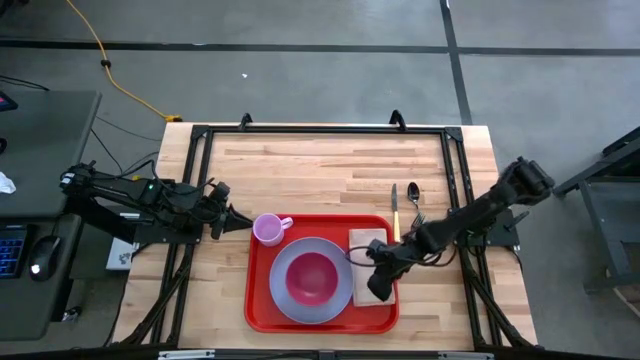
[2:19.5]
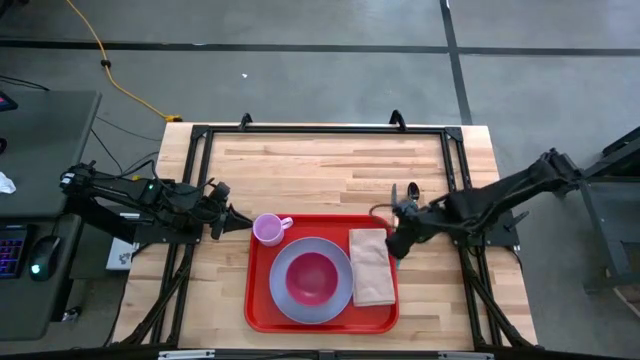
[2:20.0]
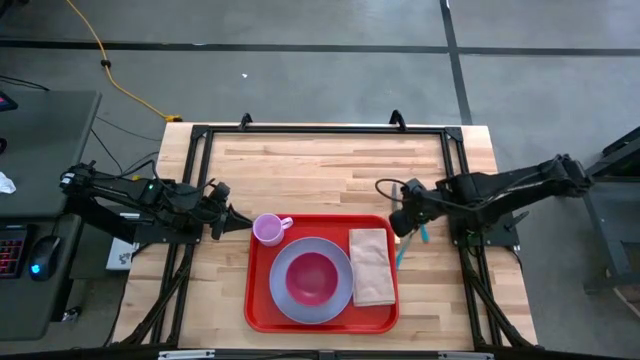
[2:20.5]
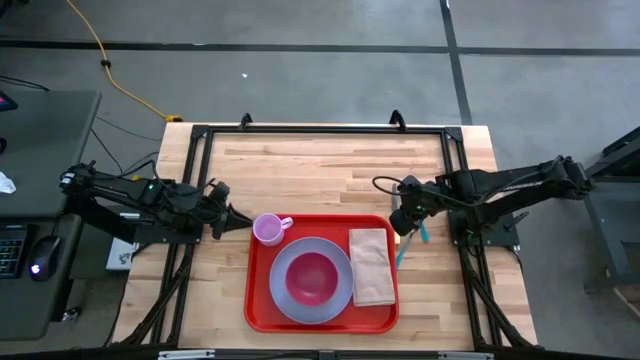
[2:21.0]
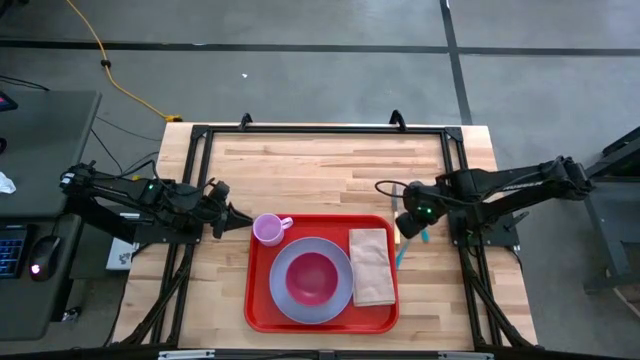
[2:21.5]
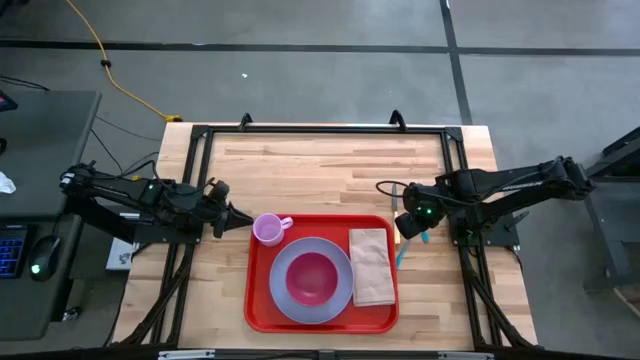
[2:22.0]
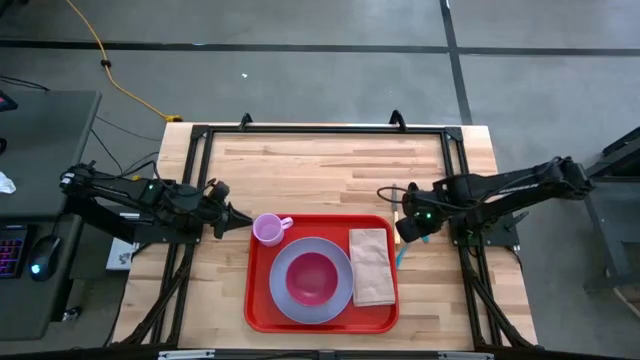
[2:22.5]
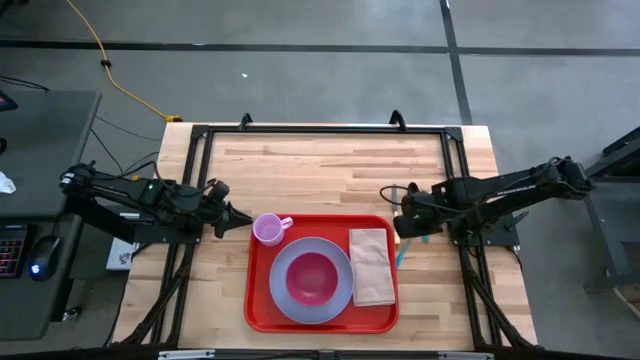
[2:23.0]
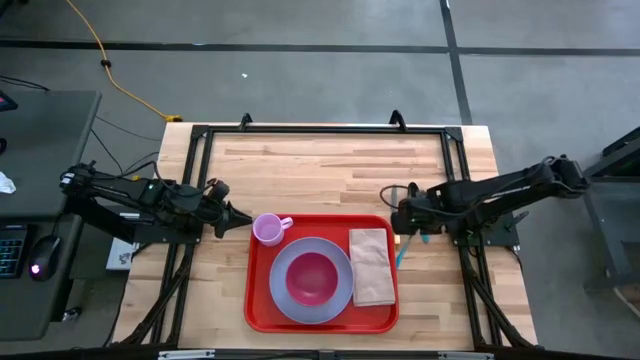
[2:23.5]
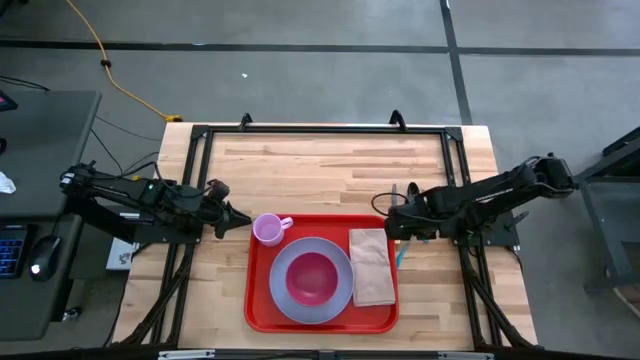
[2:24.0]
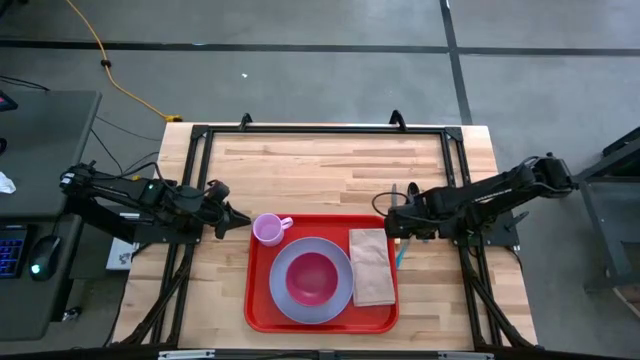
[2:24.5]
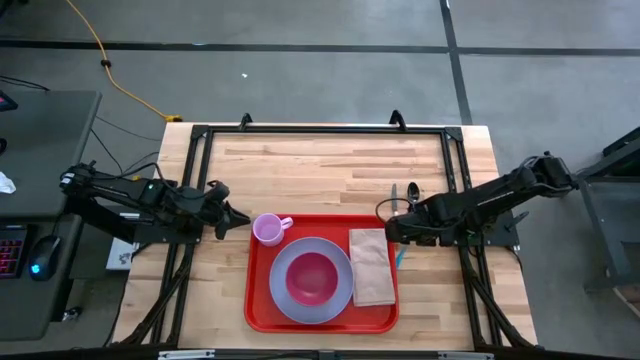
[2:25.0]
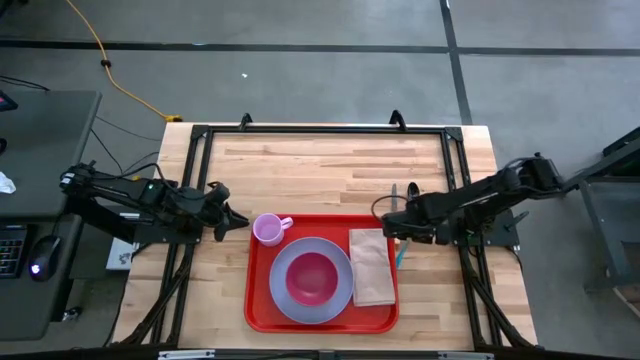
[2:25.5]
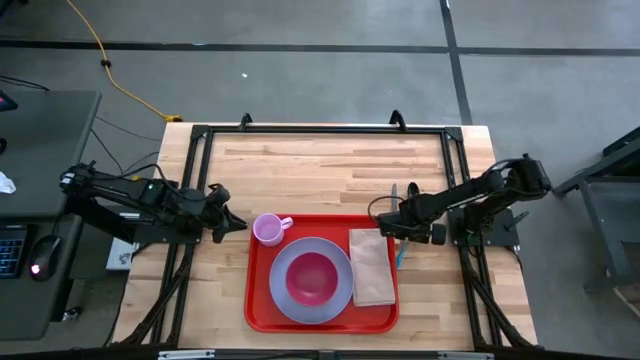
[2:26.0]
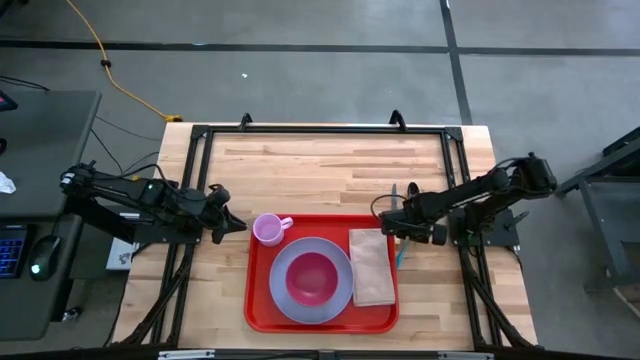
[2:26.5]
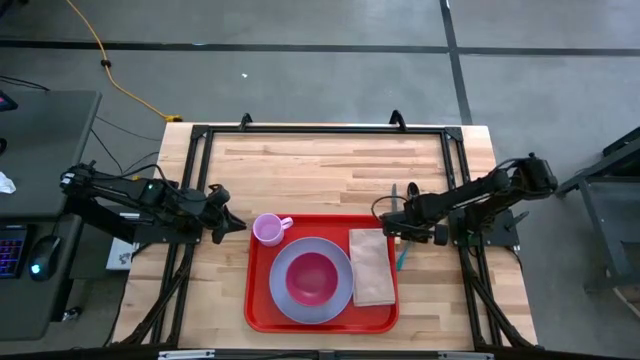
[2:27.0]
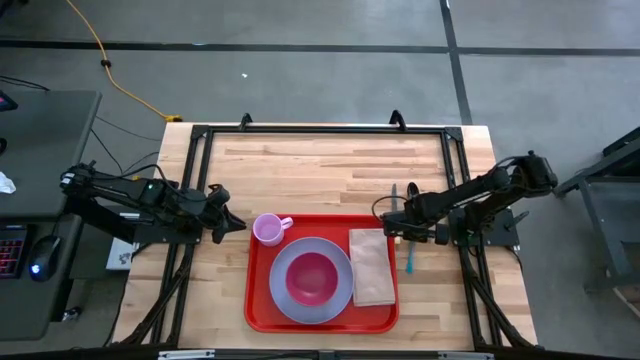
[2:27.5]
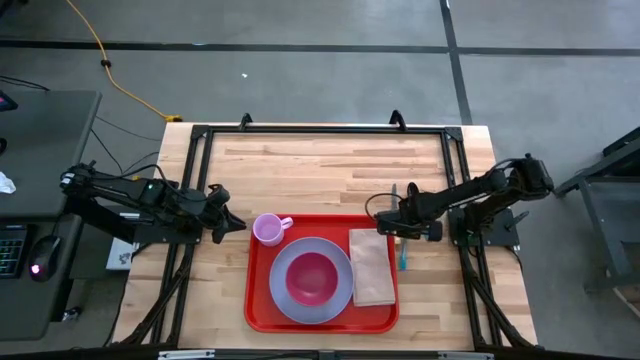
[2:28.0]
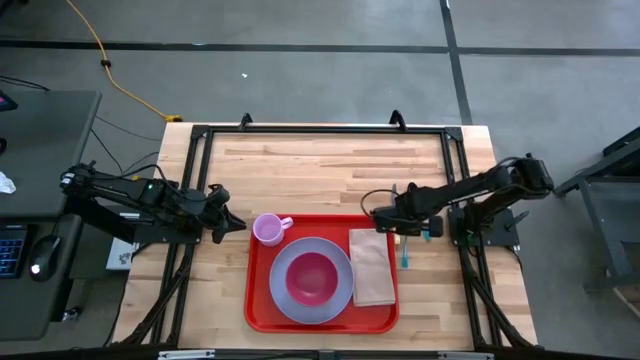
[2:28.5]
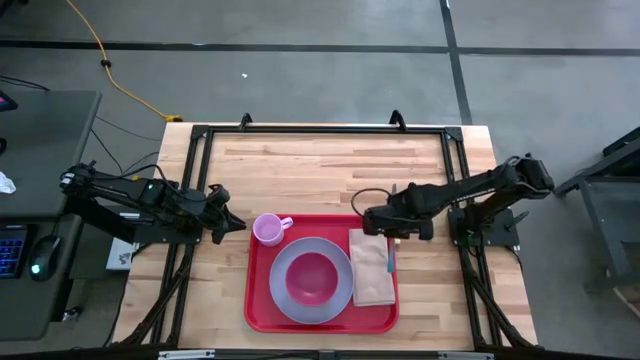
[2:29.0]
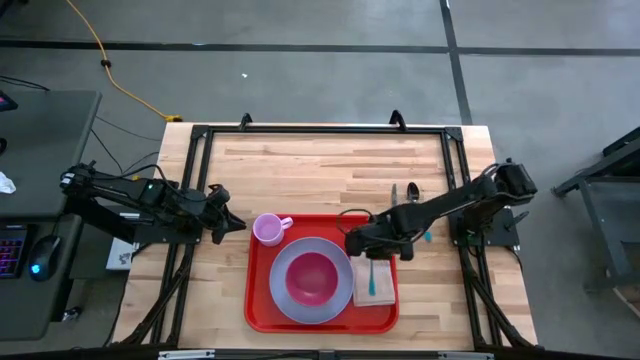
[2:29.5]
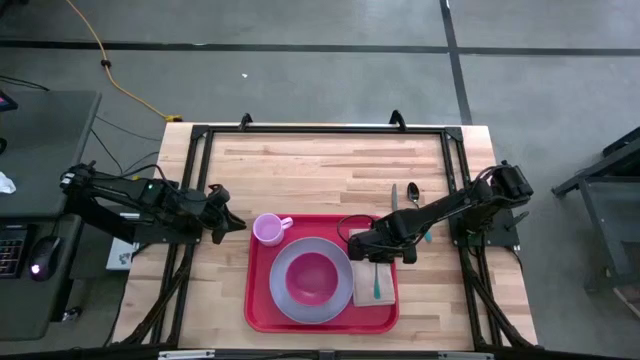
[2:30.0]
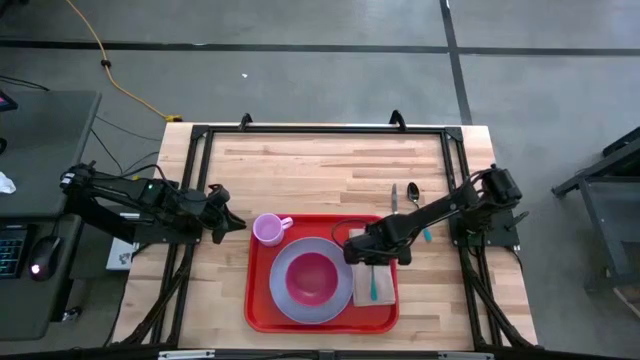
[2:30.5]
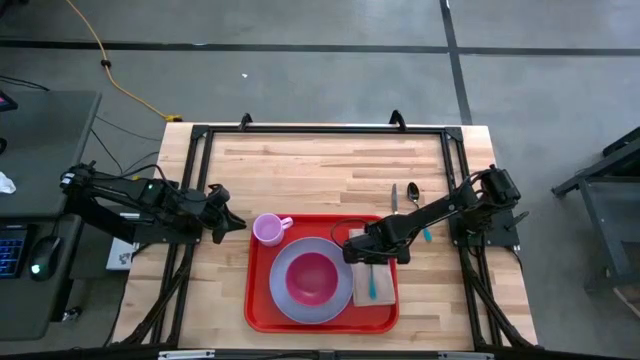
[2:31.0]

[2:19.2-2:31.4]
Task: Set up tray
Put the blue fork on the brown table napkin

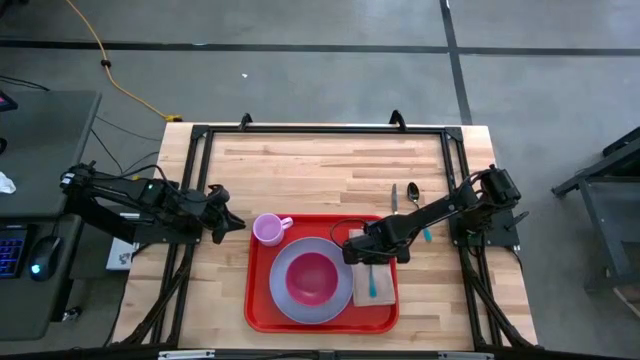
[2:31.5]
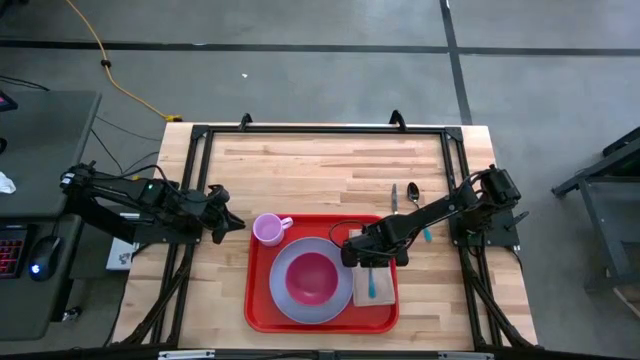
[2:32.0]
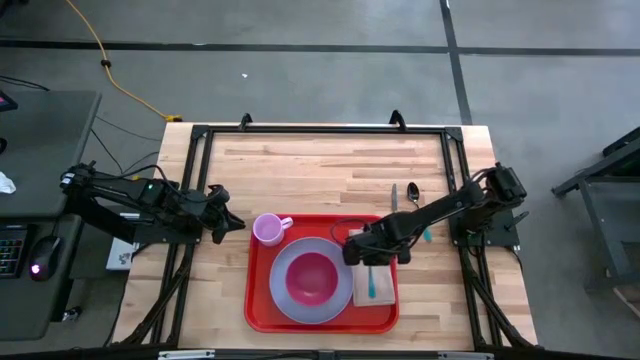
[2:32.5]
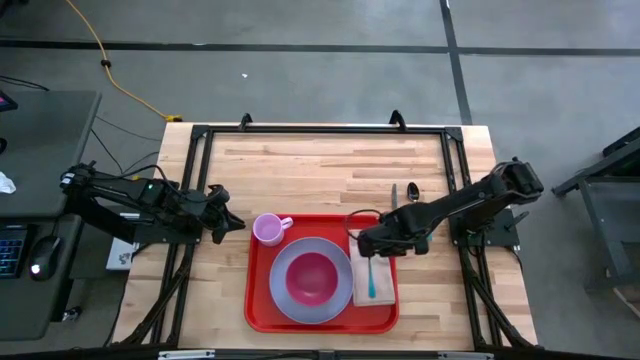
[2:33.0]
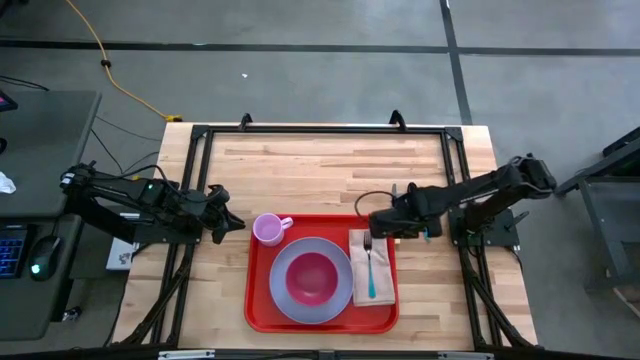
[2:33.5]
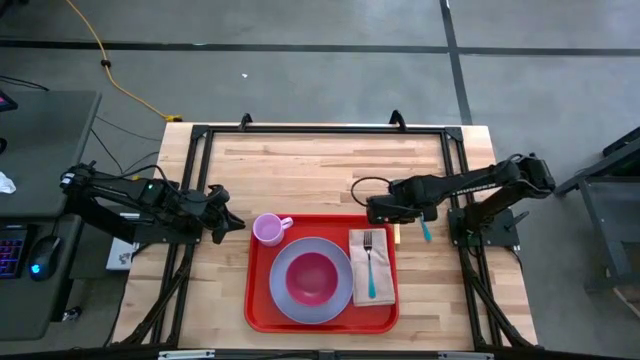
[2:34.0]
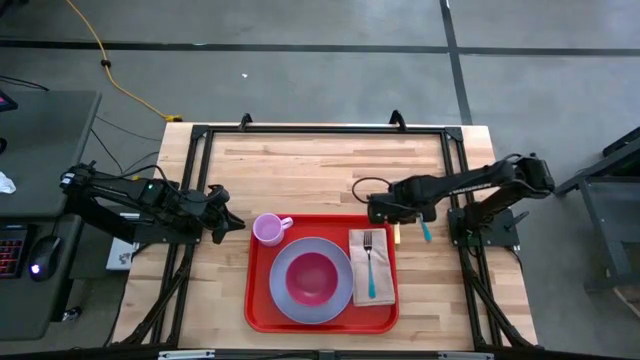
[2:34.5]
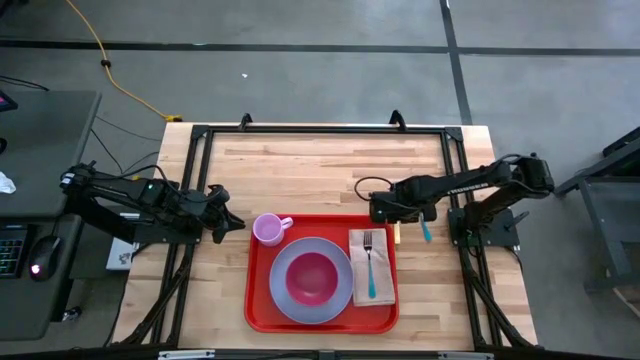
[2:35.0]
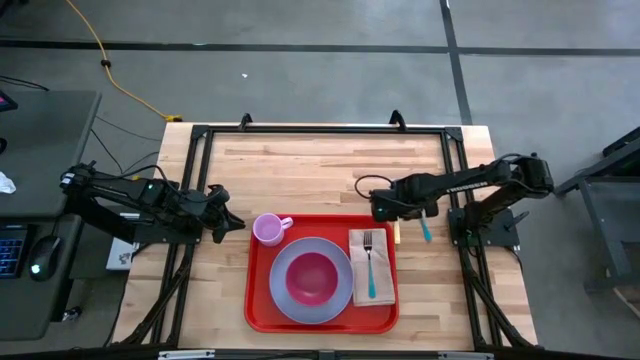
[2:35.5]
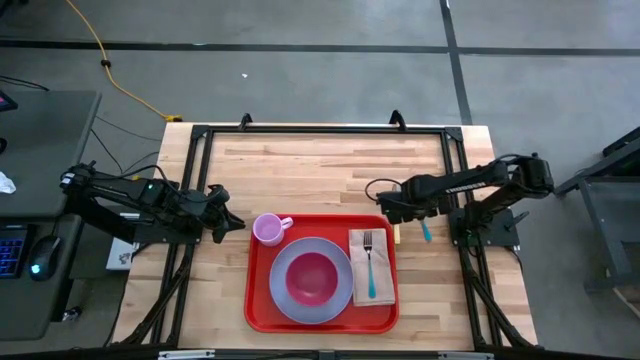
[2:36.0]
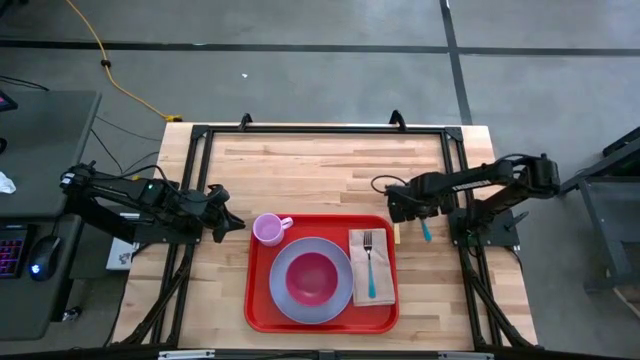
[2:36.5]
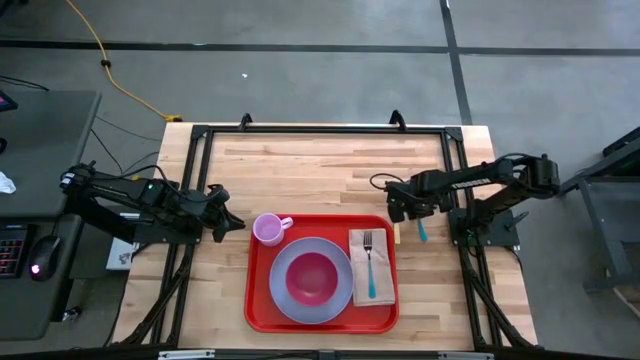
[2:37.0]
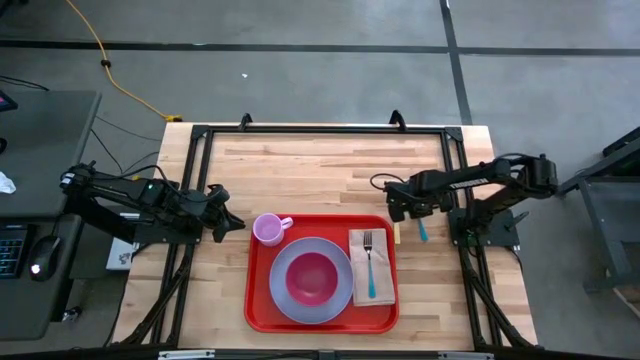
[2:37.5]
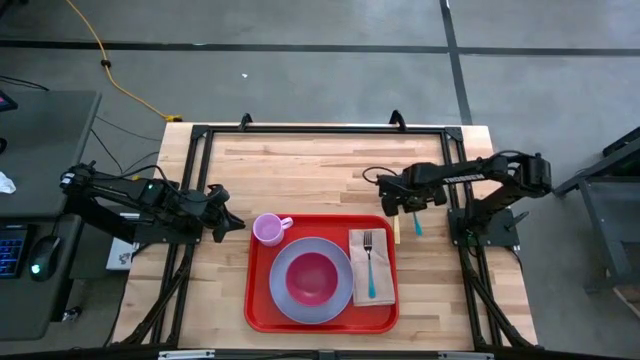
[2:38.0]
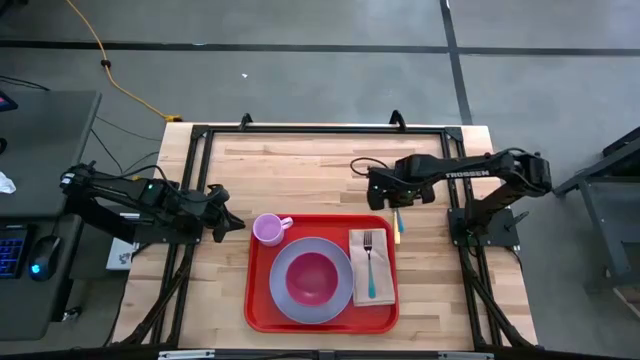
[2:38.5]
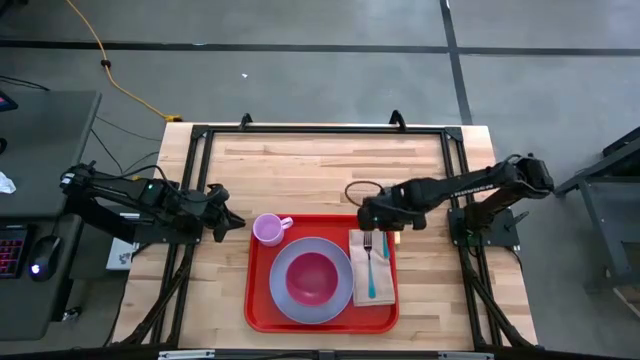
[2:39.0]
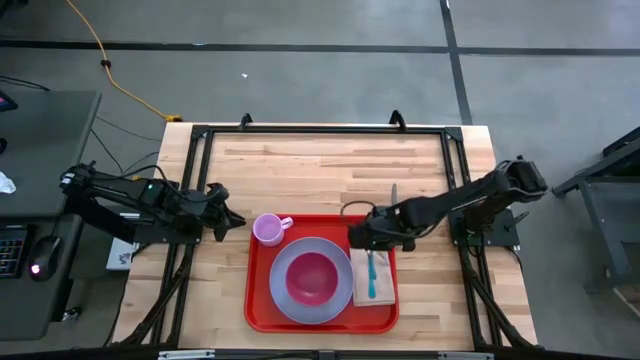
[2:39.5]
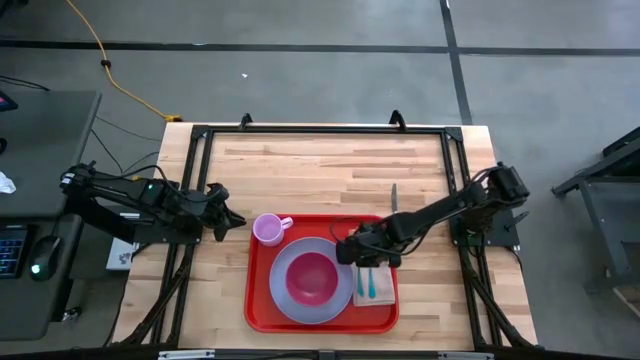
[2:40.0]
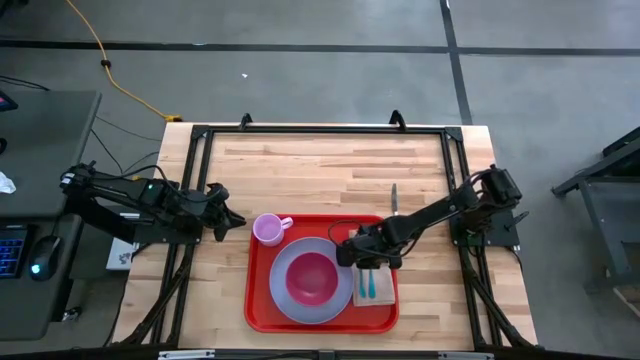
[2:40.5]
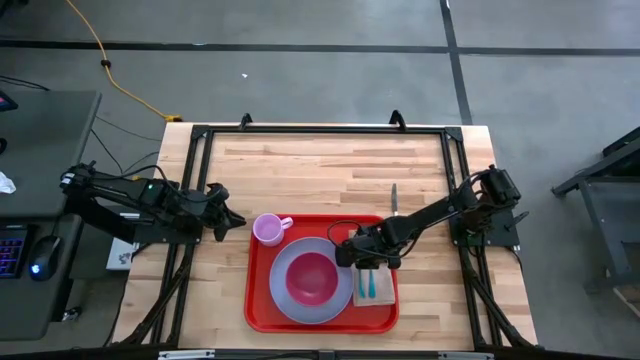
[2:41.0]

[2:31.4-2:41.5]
Put the blue spoon on the brown table napkin to the left of the blue fork
